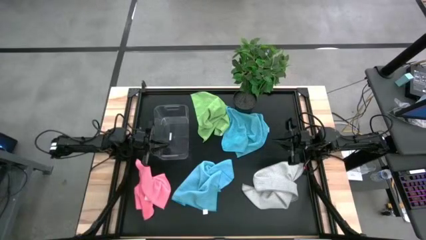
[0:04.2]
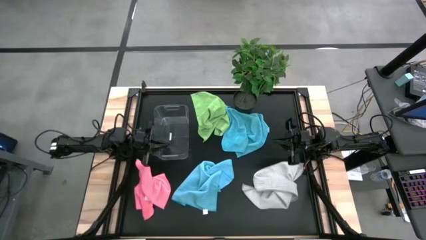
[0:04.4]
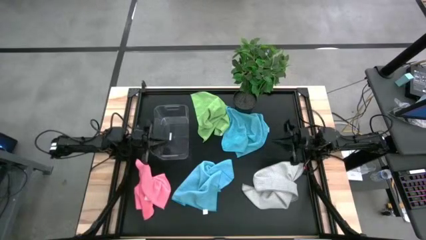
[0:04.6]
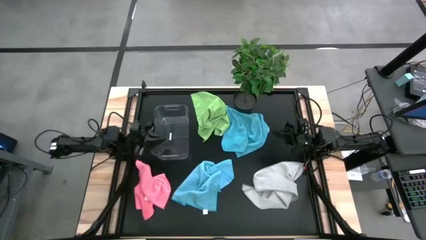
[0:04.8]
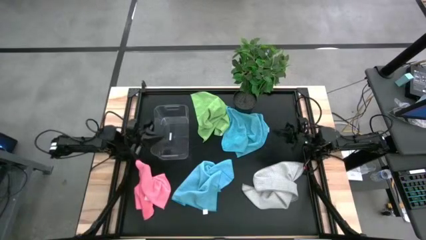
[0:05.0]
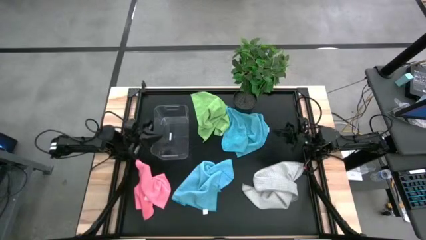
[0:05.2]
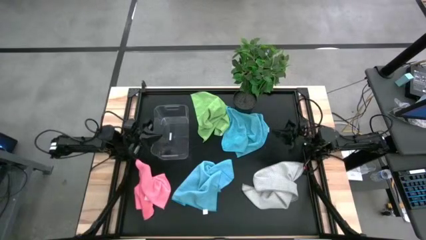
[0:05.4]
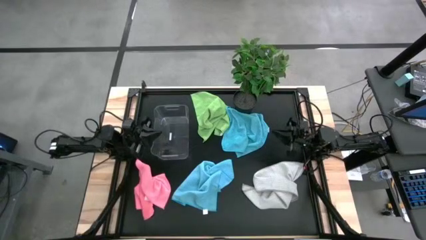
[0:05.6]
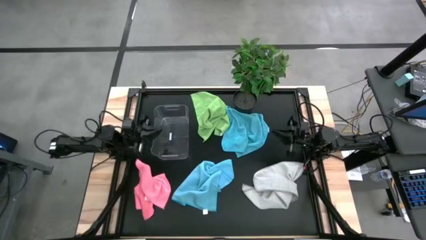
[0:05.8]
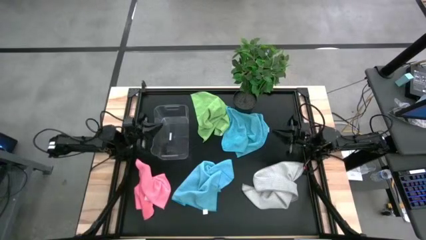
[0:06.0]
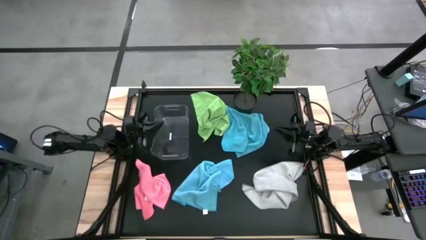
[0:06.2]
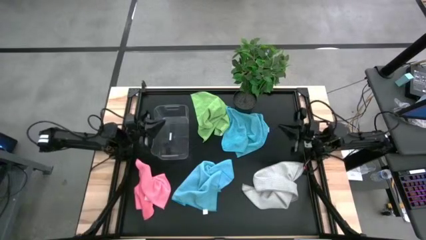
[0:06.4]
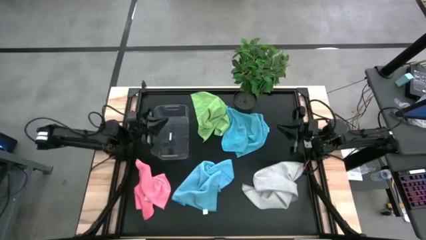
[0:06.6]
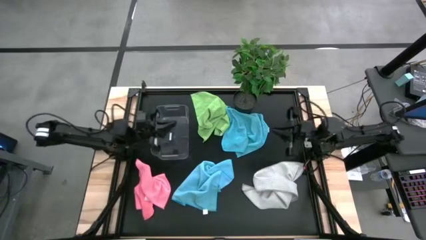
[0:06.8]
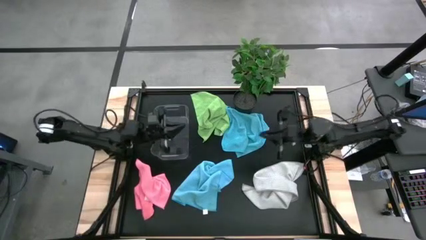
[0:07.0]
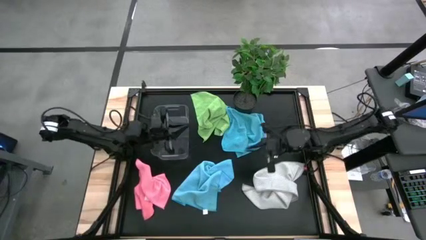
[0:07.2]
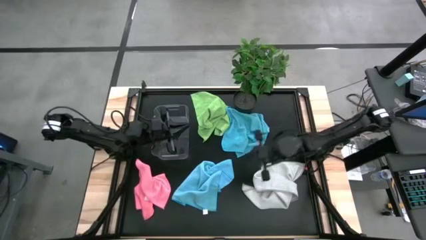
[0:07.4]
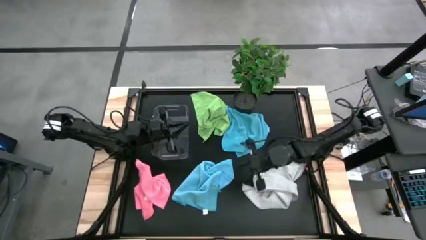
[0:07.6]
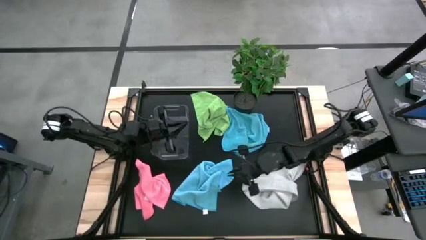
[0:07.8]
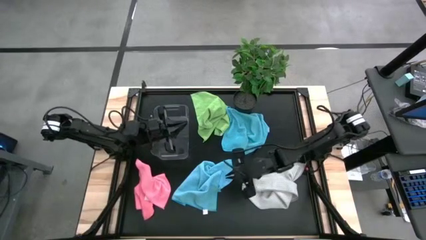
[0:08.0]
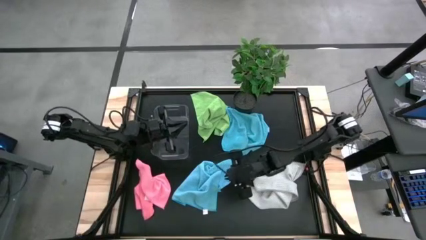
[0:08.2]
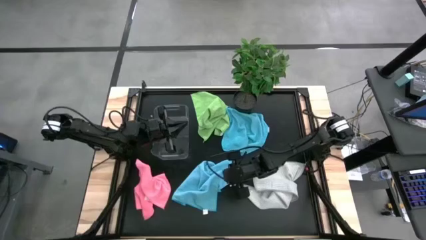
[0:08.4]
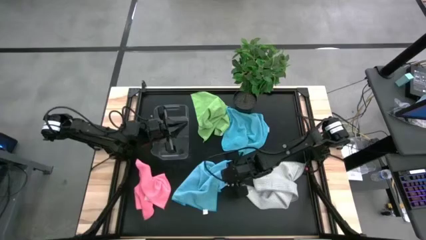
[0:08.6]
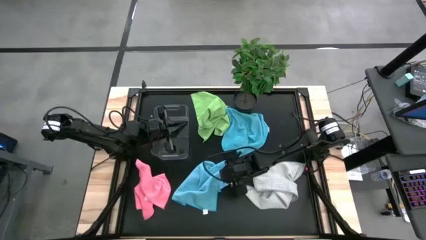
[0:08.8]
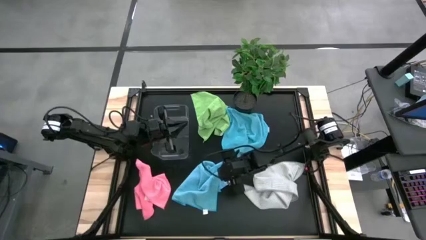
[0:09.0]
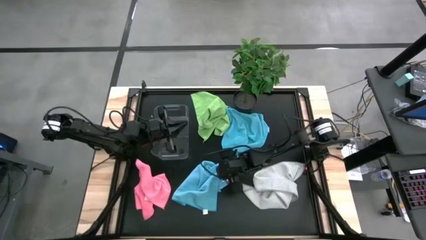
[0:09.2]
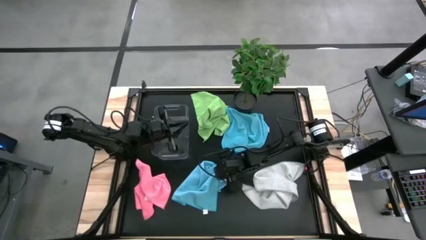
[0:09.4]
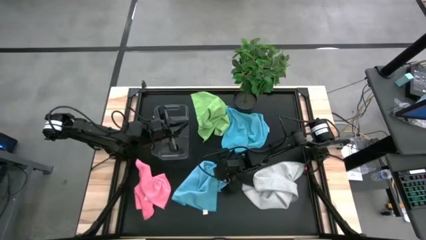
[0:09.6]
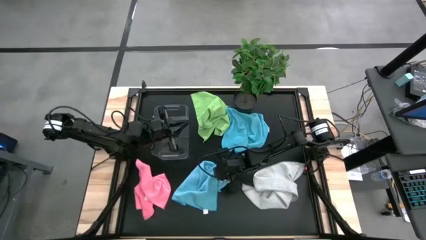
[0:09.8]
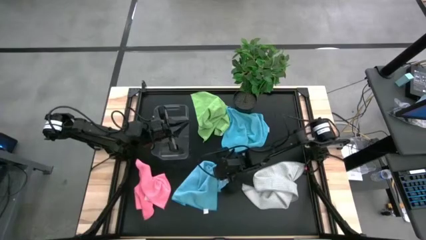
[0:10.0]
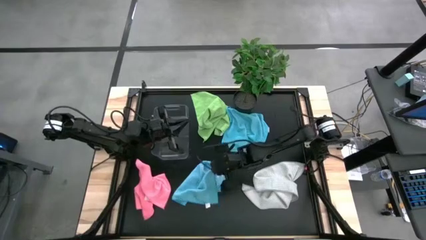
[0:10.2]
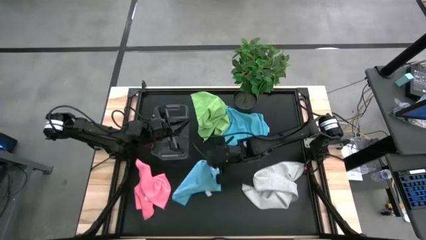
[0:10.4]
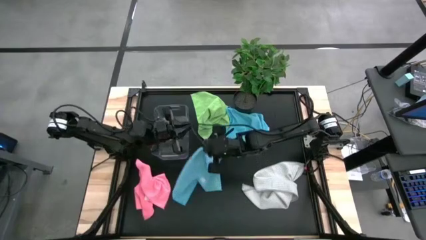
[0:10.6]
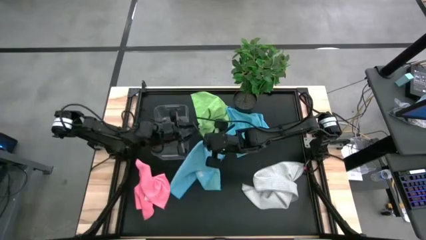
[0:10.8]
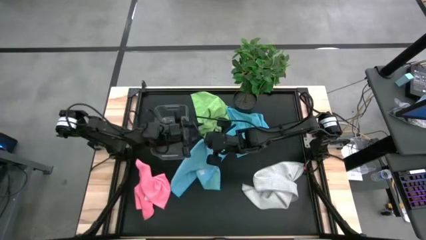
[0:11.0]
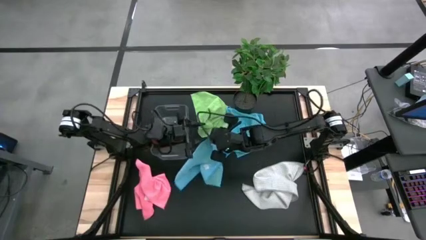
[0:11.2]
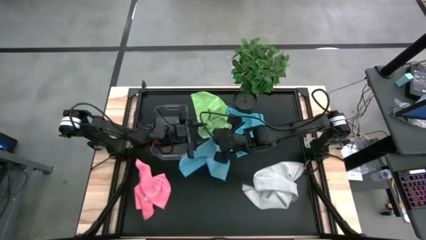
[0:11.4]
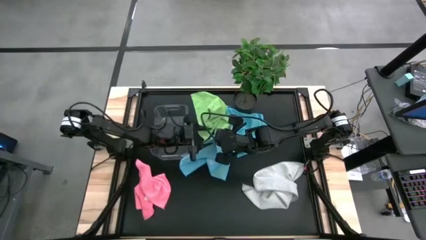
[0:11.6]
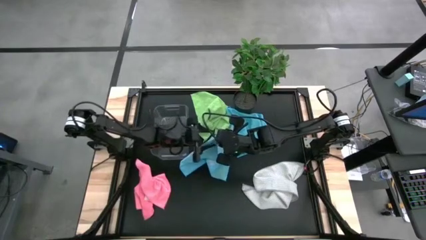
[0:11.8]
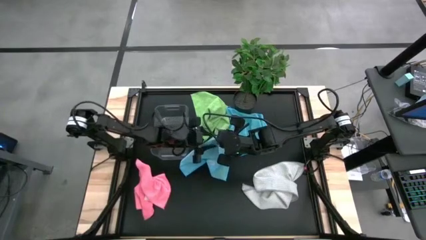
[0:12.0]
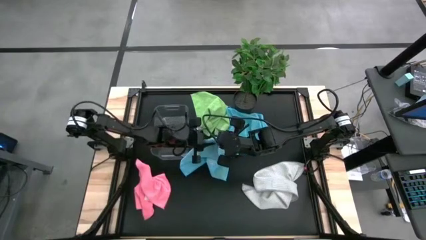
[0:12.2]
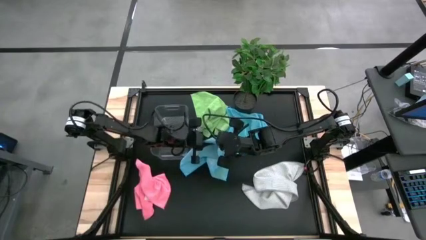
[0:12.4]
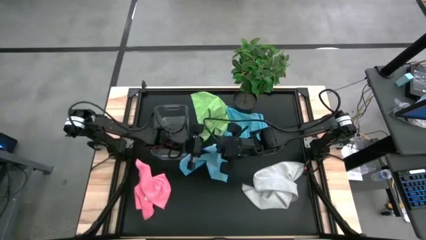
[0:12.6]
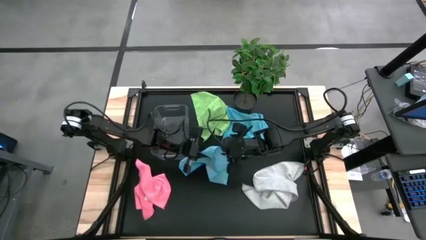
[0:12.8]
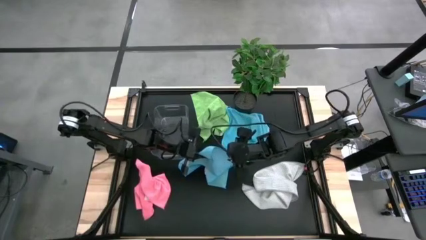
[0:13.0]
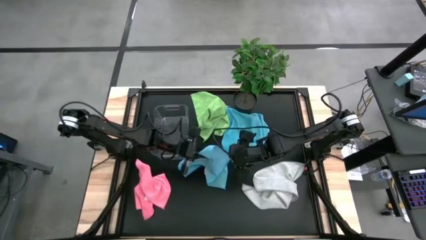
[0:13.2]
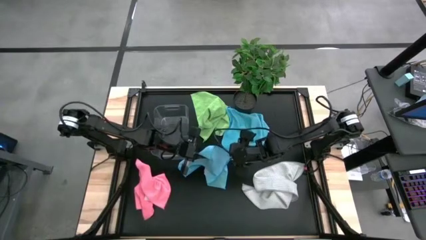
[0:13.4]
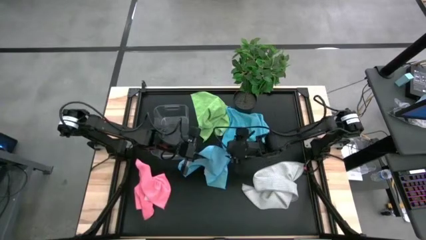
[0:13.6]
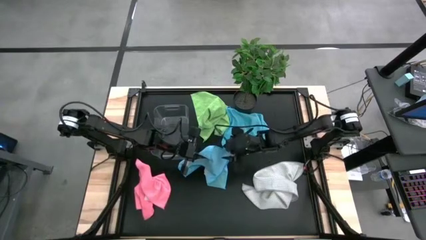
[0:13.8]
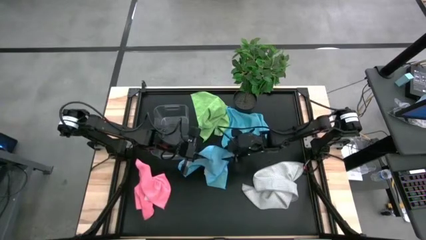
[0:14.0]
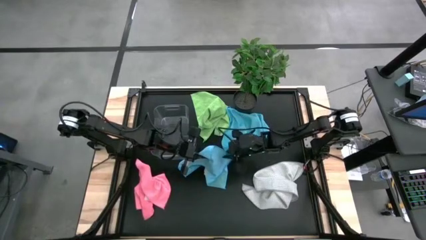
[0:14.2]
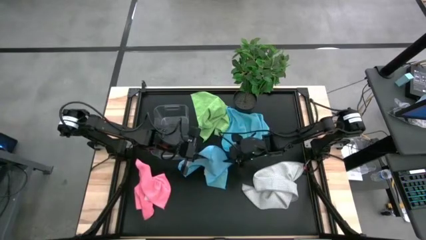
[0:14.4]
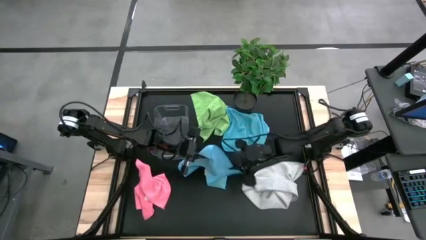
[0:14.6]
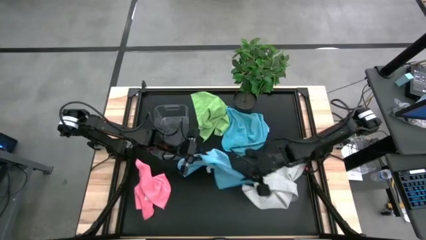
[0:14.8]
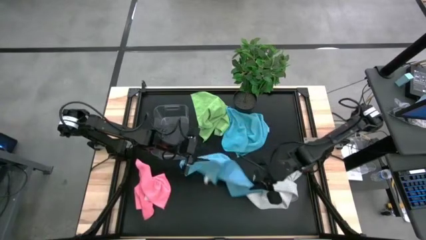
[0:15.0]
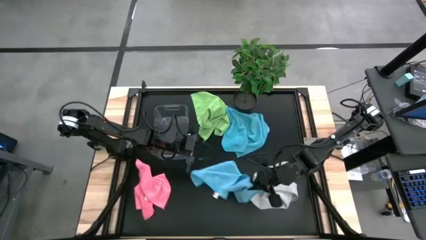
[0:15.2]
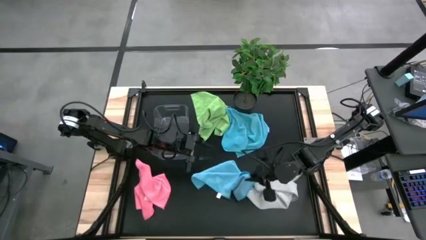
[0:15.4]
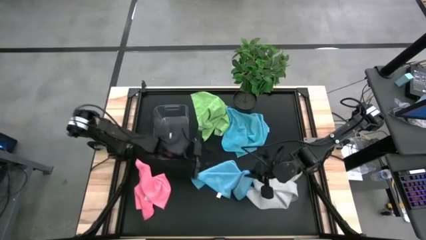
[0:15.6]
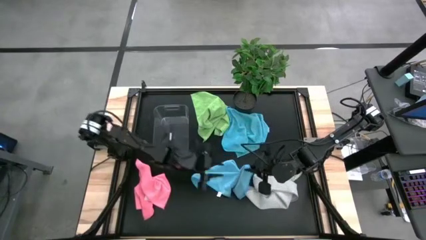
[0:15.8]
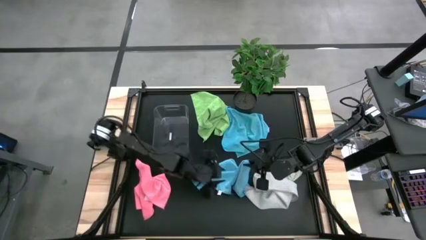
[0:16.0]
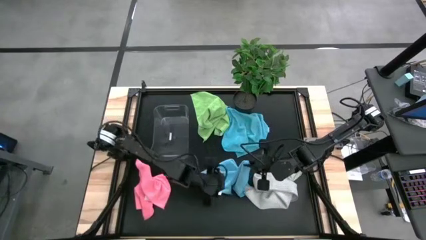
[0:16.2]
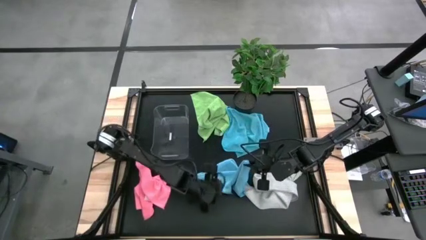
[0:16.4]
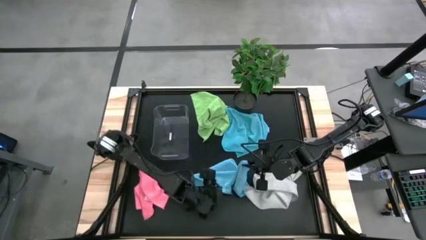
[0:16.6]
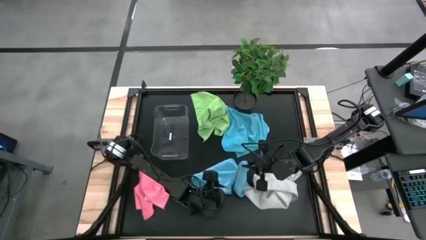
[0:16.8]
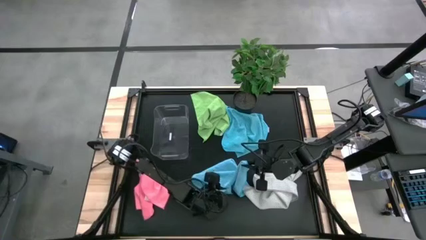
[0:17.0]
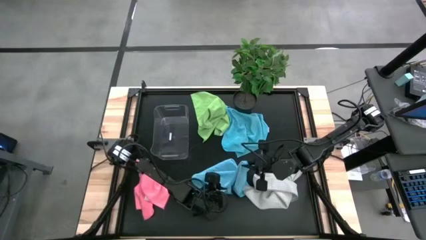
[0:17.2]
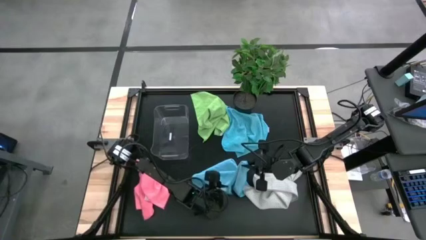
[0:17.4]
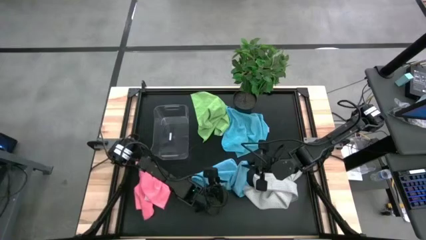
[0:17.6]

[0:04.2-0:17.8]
Task: Fold microfiber towels
Fold the bottom blue microfiber towel
